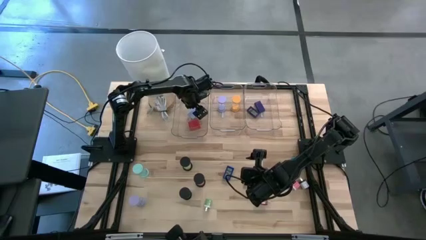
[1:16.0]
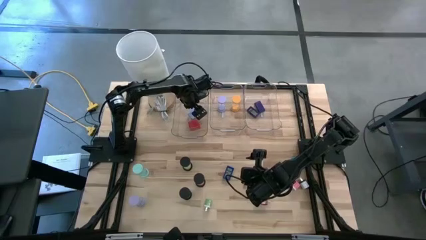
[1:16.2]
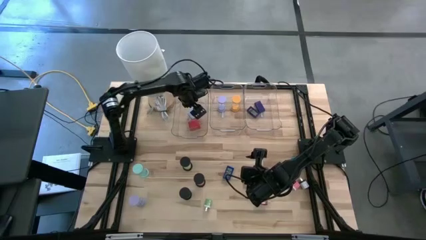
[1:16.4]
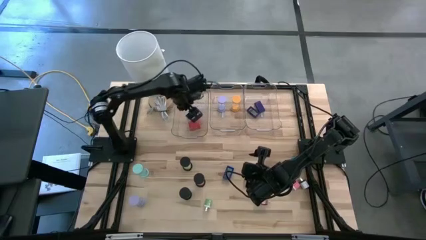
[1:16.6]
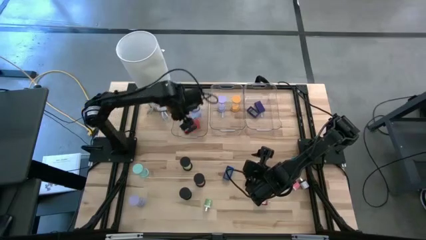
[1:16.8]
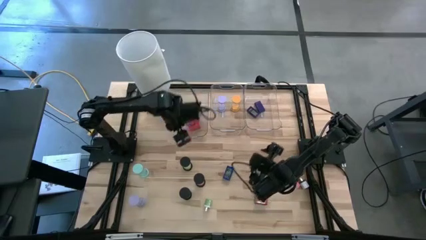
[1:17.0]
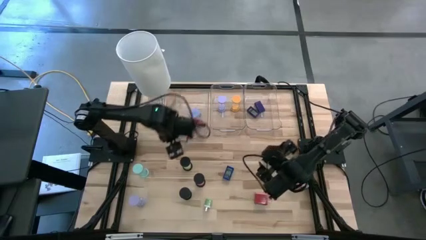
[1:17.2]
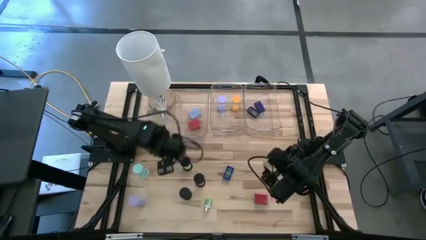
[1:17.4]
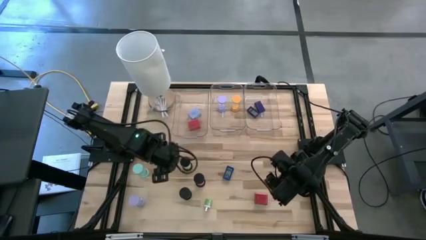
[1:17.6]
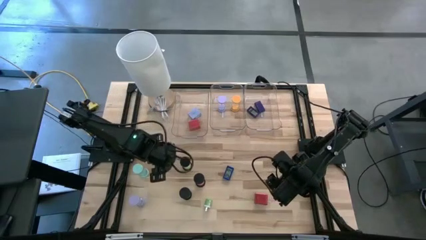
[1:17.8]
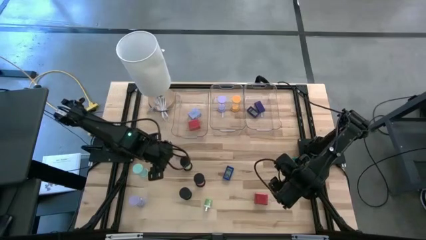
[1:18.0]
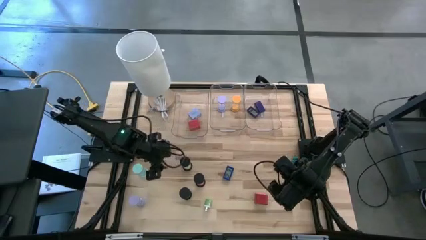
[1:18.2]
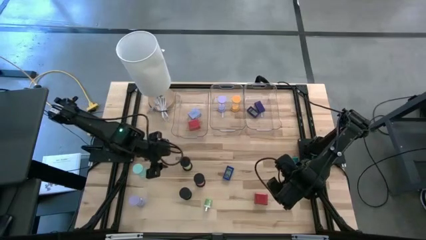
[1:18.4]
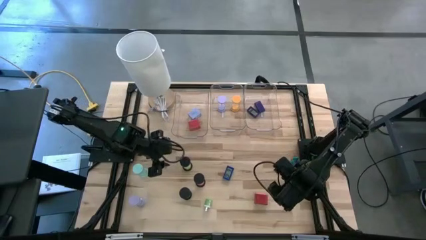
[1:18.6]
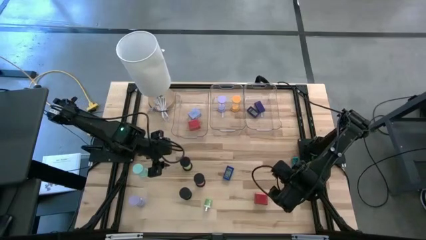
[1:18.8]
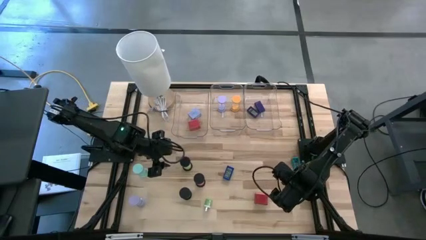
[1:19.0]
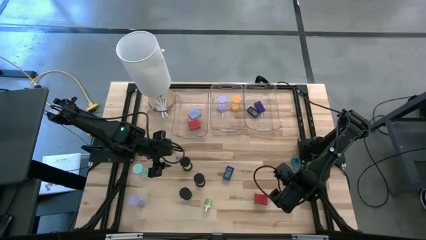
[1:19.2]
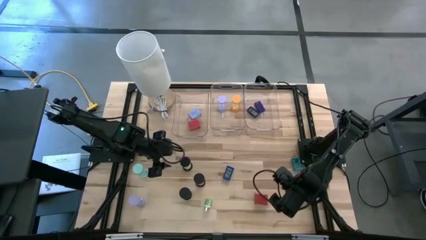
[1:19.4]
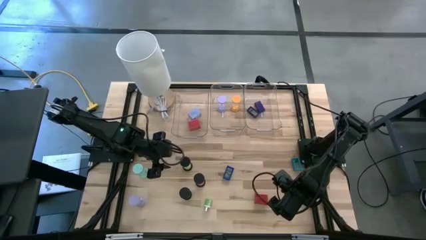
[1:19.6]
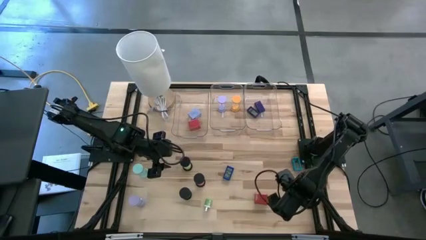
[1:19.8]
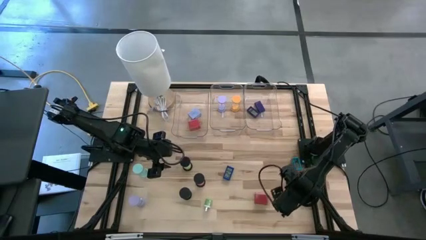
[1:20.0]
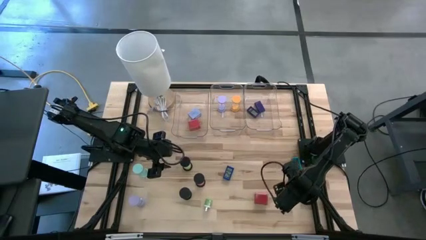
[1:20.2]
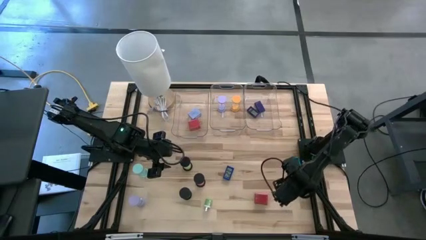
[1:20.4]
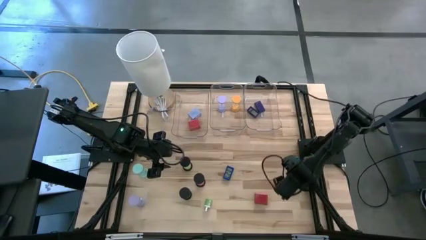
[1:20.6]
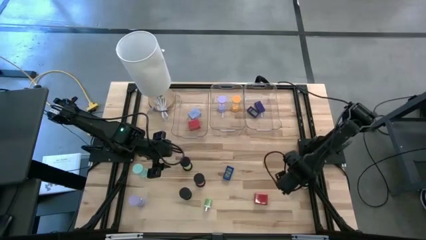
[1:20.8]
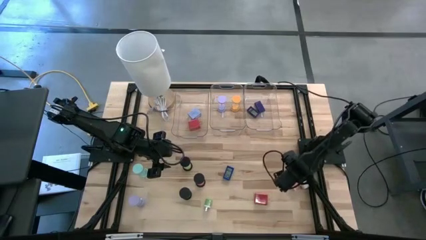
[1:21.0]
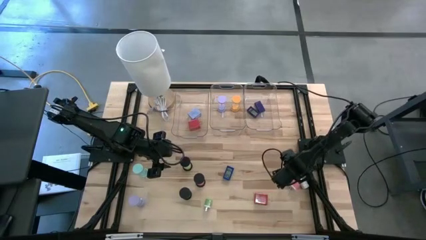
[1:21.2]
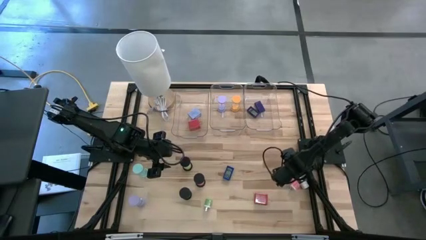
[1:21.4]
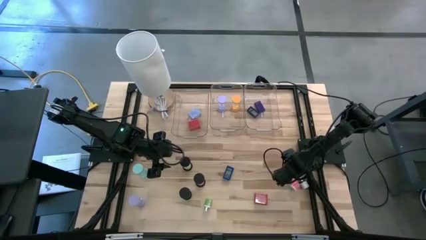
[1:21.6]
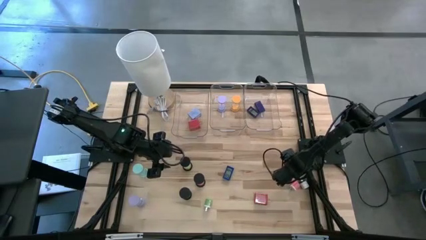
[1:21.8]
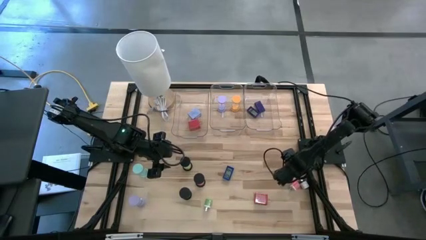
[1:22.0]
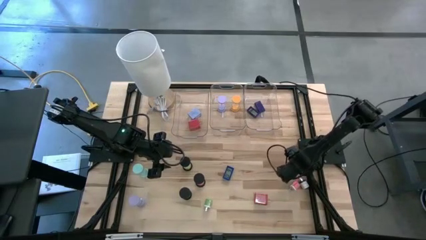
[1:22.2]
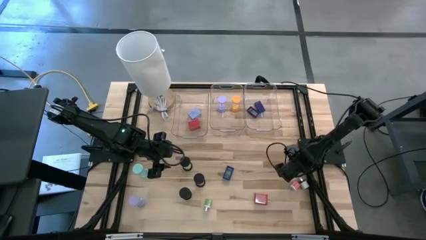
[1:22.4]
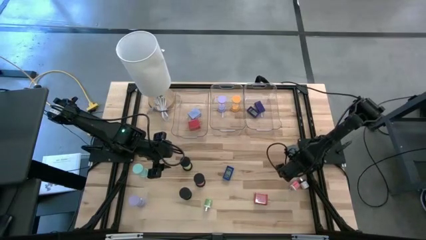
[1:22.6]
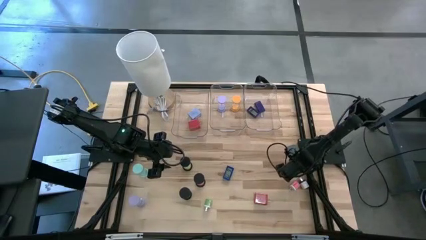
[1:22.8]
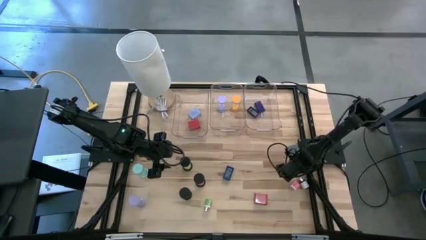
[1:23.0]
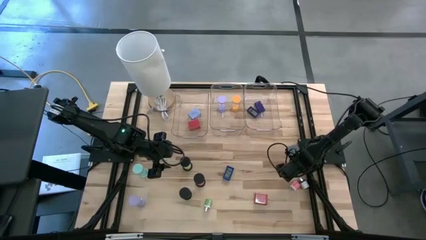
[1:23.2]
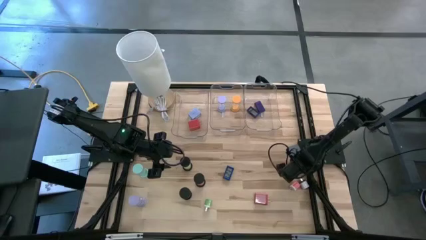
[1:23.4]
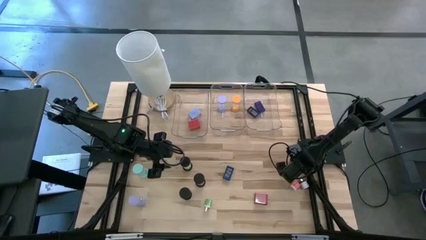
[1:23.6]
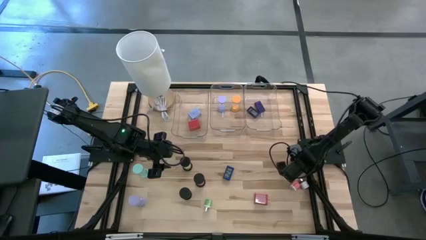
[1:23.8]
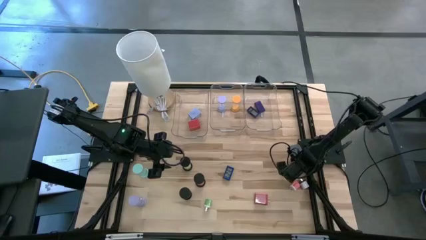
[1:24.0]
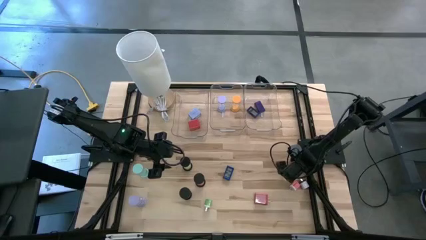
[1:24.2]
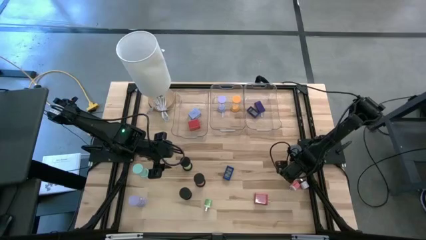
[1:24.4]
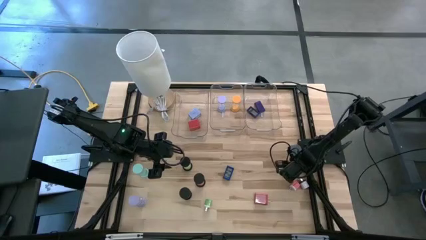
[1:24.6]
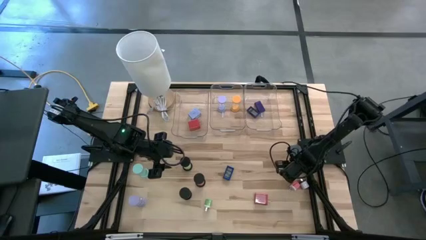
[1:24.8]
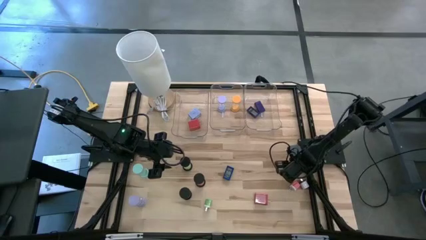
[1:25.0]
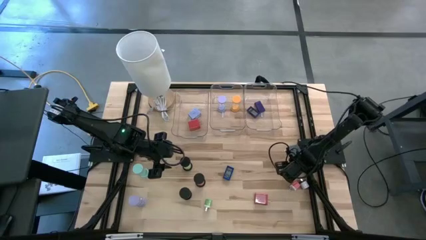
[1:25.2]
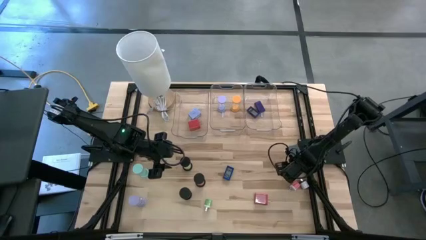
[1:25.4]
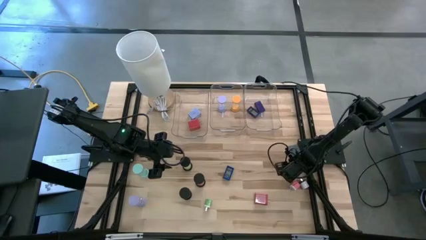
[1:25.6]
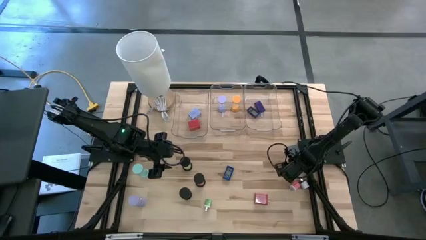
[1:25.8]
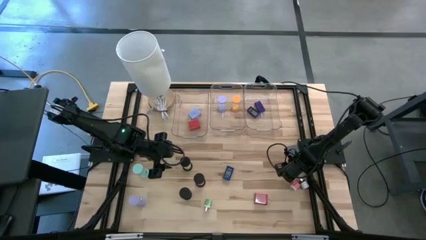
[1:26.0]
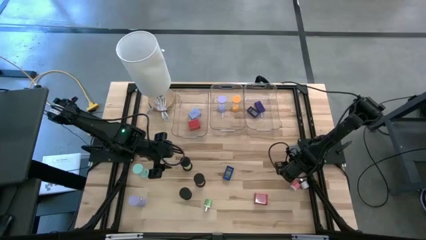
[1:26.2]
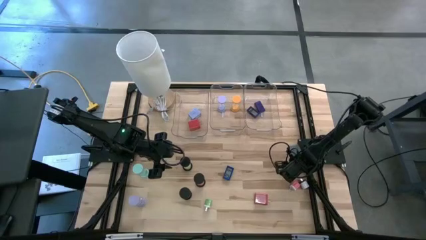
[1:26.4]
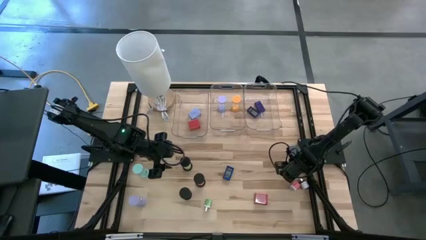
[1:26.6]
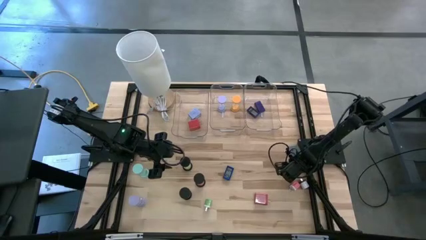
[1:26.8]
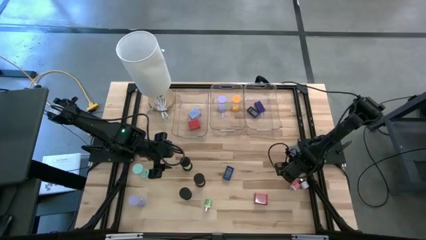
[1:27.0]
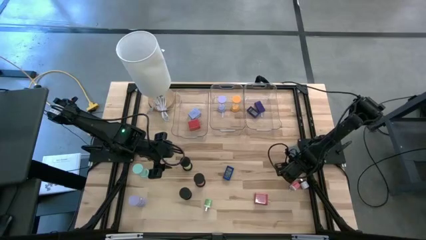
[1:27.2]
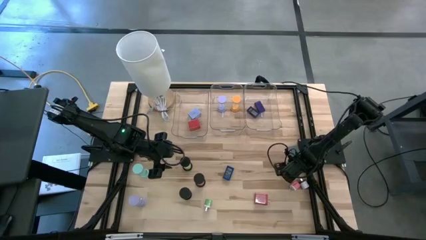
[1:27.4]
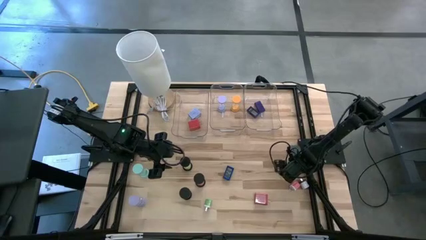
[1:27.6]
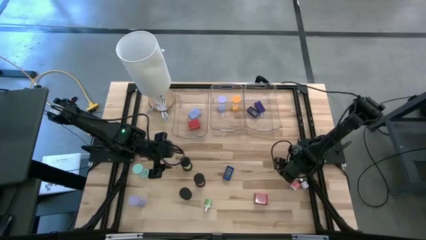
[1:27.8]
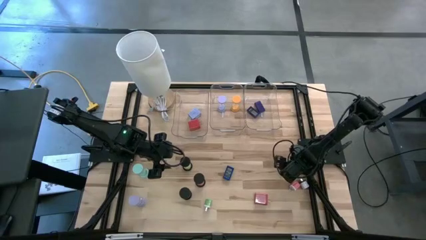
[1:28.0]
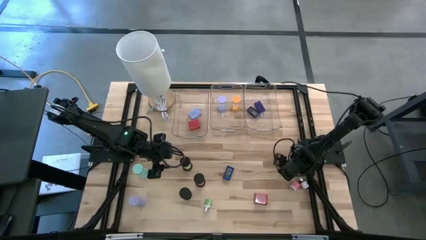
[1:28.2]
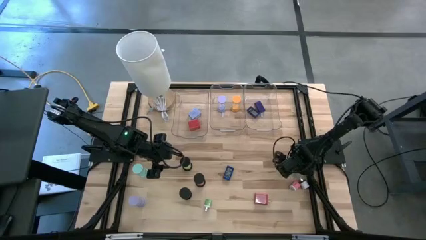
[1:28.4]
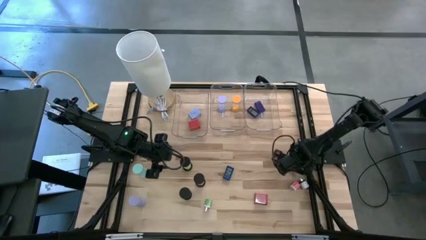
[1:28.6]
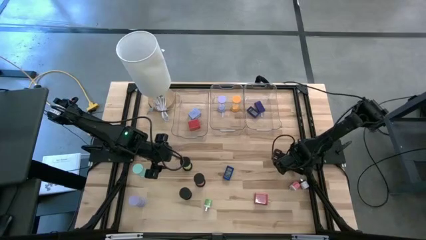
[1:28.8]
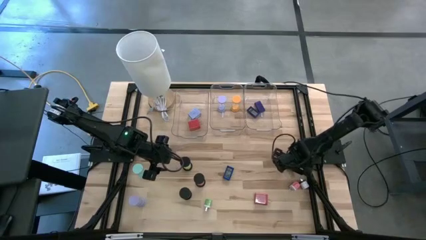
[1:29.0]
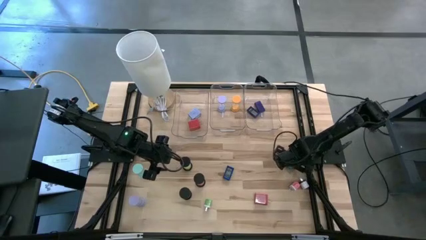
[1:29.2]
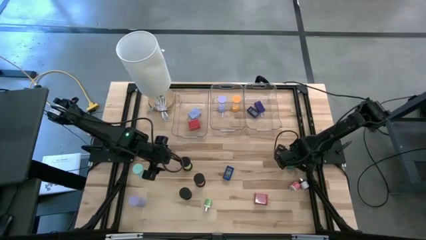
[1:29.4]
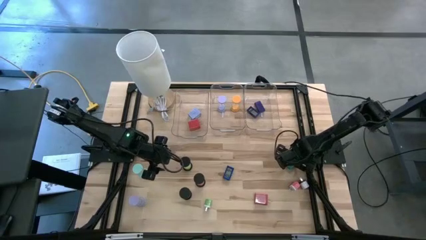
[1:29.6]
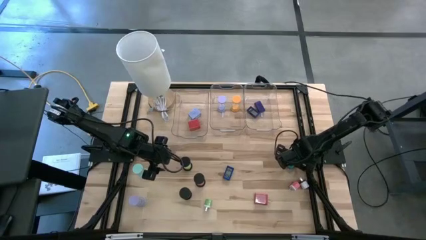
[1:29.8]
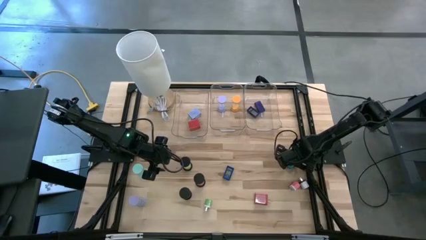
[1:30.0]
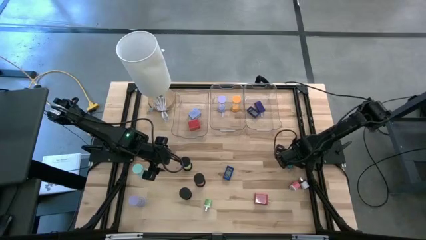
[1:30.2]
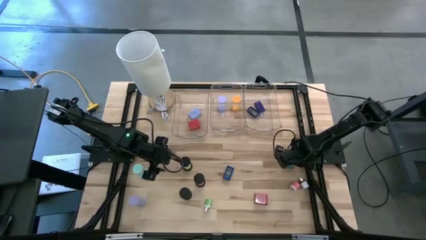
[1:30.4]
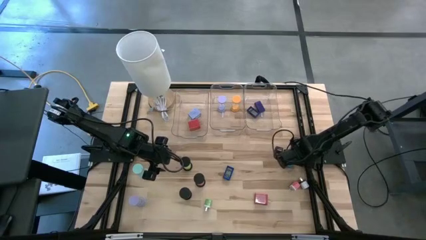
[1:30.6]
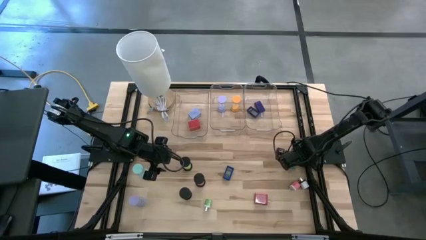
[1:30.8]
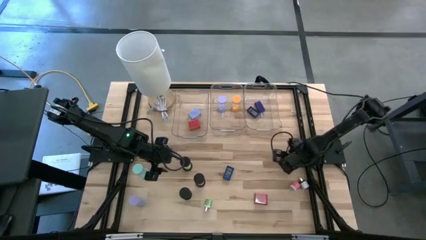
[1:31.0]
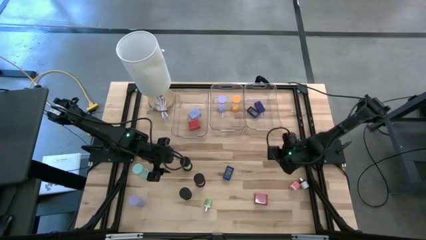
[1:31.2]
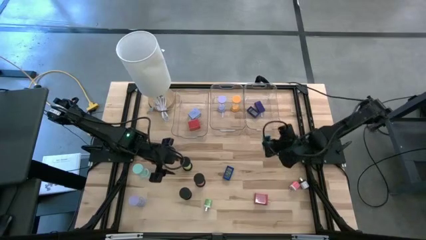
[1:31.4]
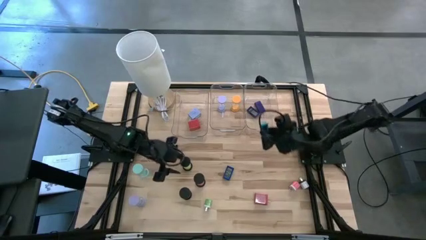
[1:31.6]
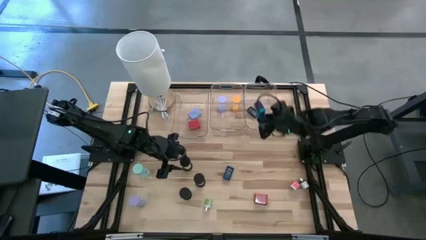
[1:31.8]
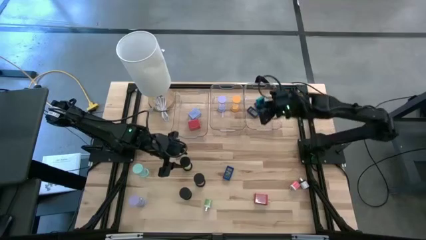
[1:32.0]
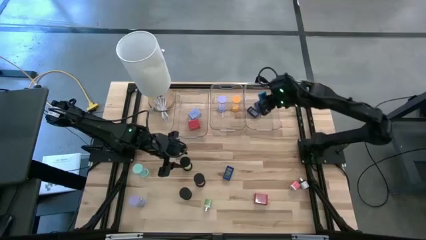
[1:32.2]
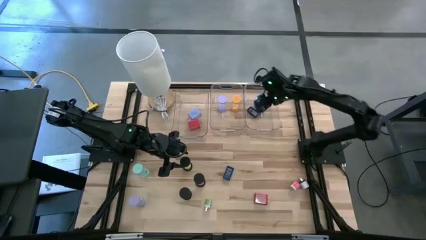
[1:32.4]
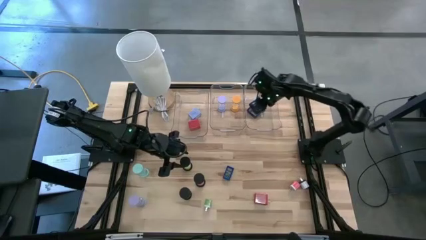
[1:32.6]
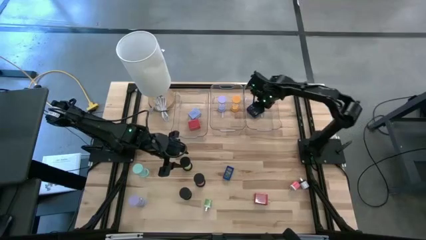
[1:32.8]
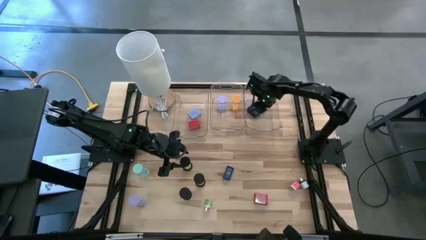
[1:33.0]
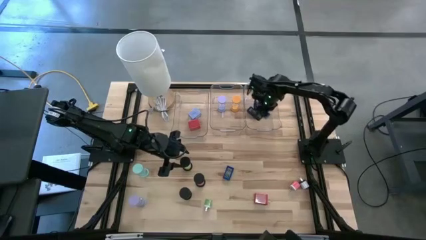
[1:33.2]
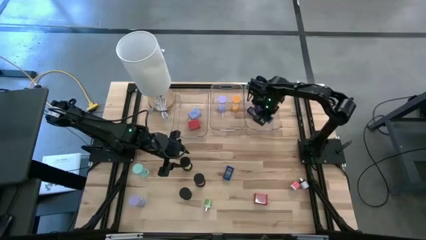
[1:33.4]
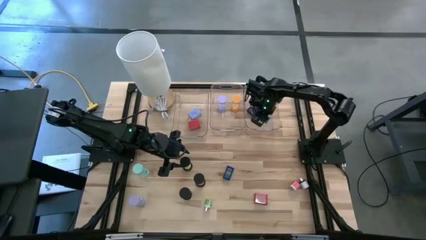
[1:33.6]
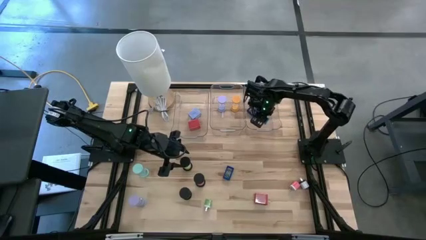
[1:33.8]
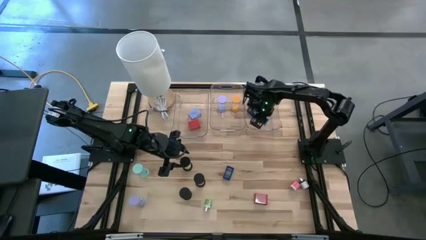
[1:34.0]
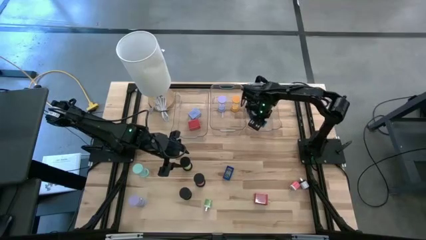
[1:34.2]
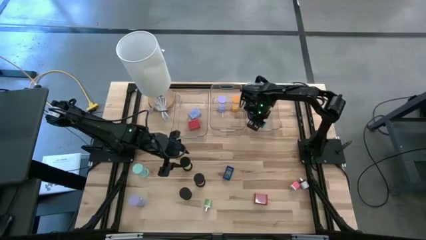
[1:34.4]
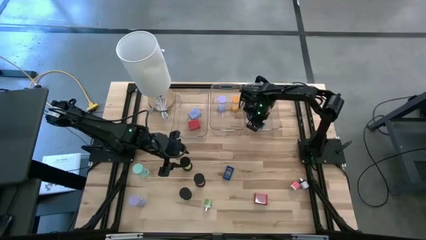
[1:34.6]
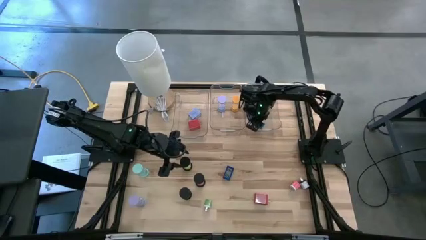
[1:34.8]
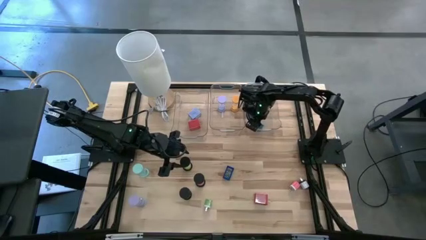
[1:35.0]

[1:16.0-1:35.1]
Task: Pick & Place Office items
Put the light blue digital clock into the right transparent bin
